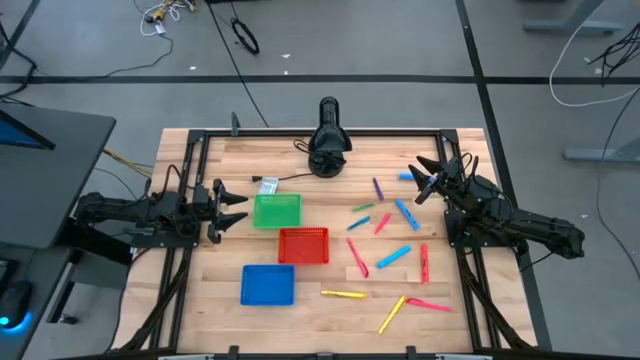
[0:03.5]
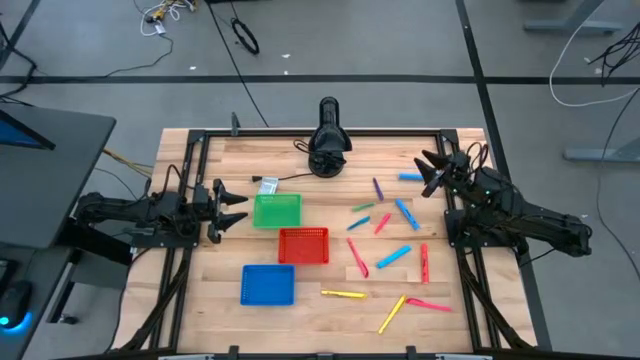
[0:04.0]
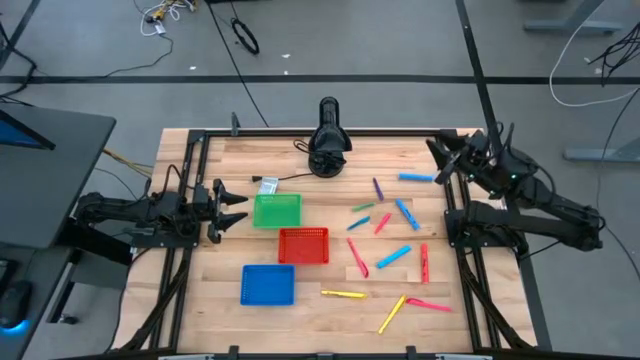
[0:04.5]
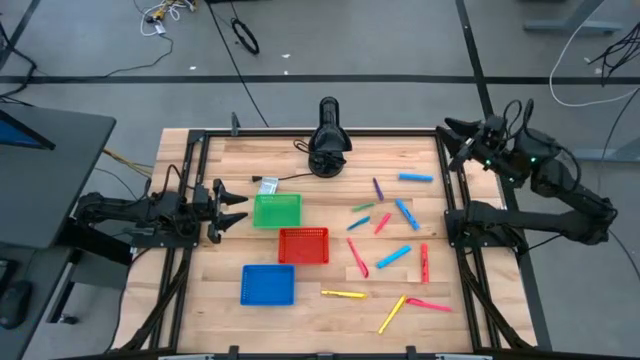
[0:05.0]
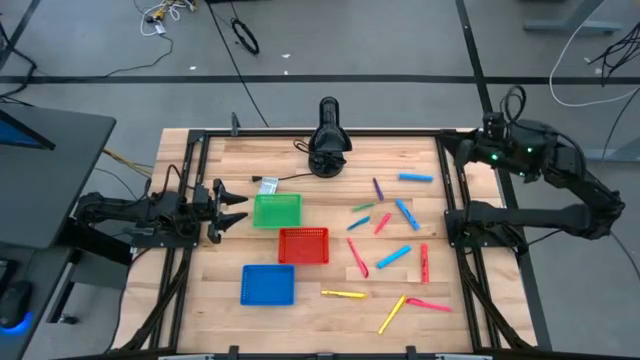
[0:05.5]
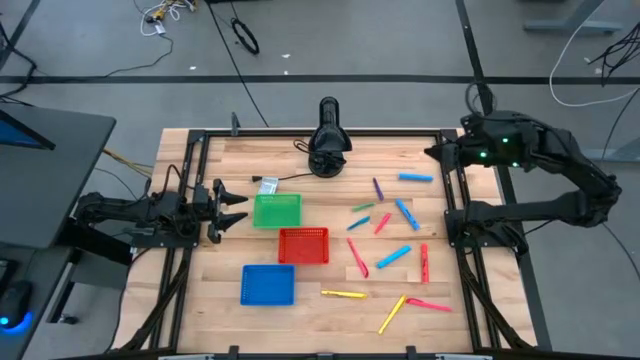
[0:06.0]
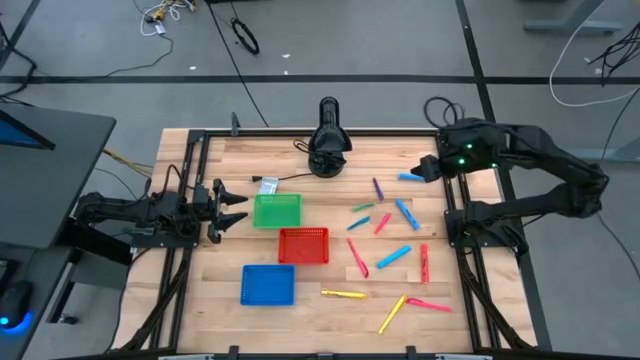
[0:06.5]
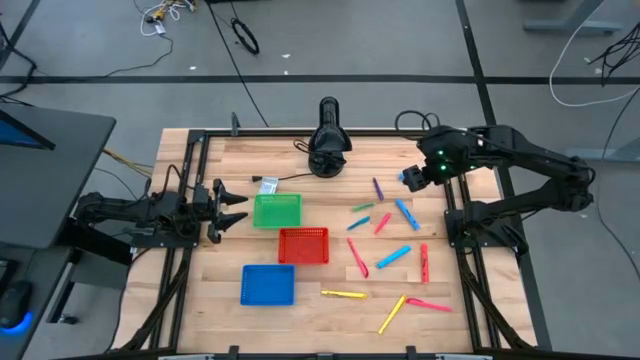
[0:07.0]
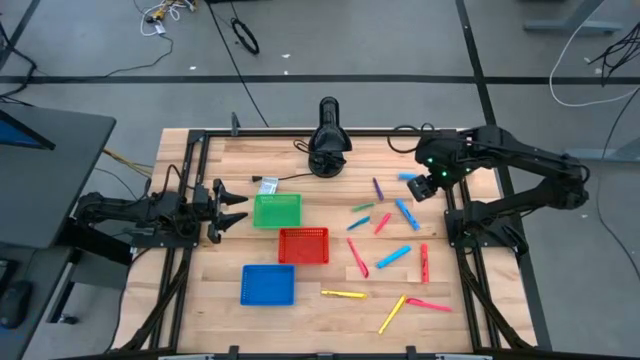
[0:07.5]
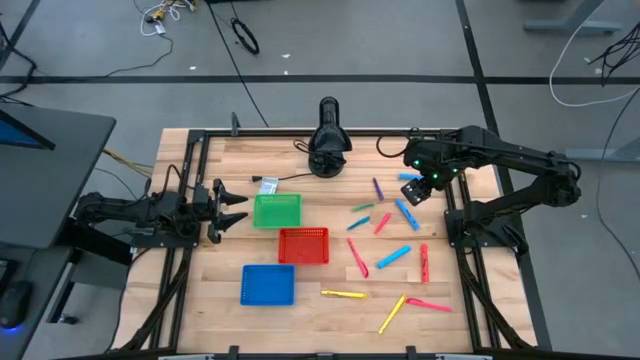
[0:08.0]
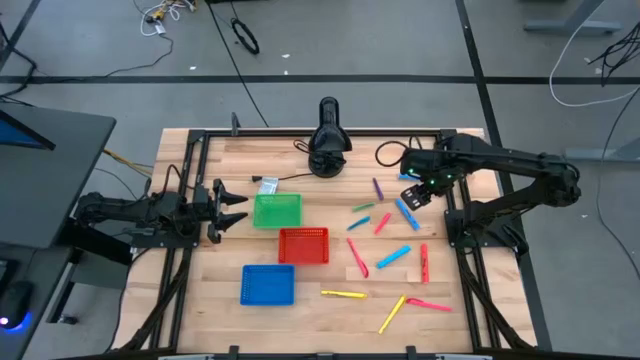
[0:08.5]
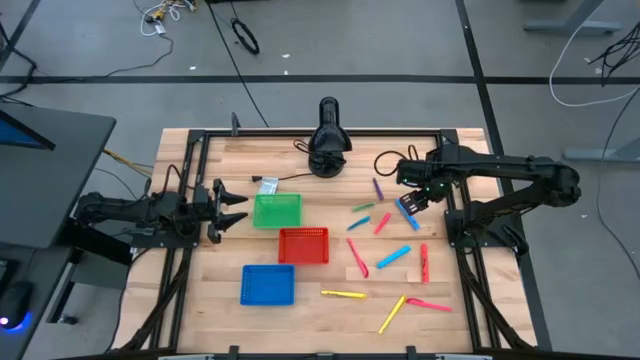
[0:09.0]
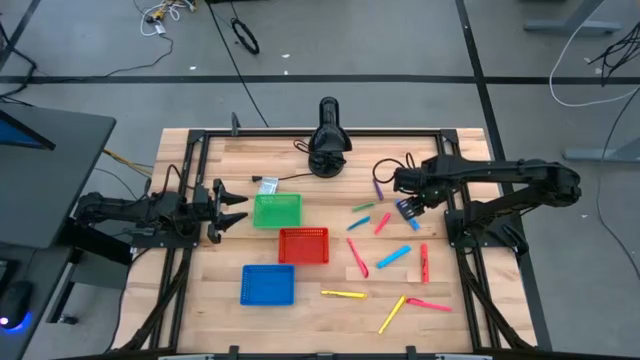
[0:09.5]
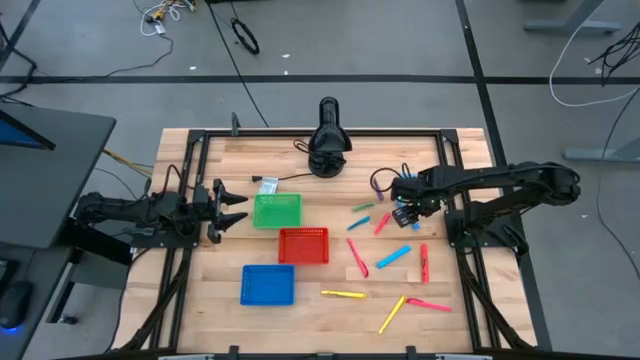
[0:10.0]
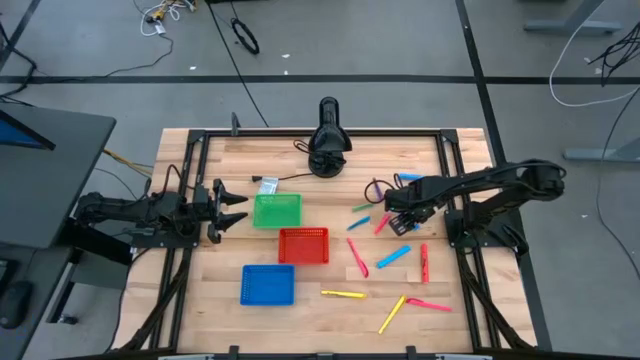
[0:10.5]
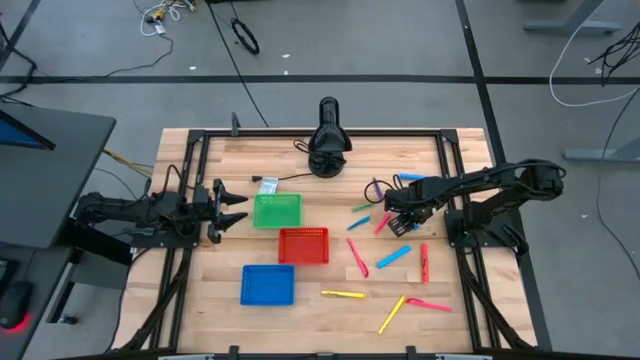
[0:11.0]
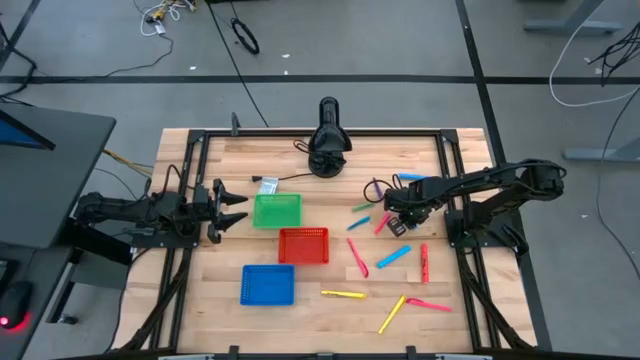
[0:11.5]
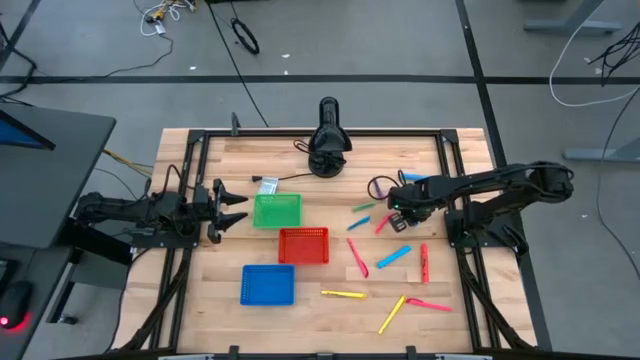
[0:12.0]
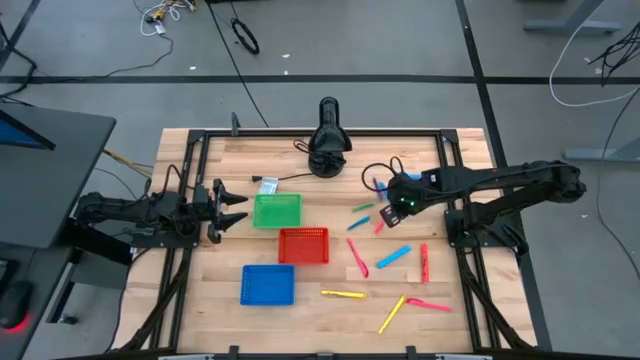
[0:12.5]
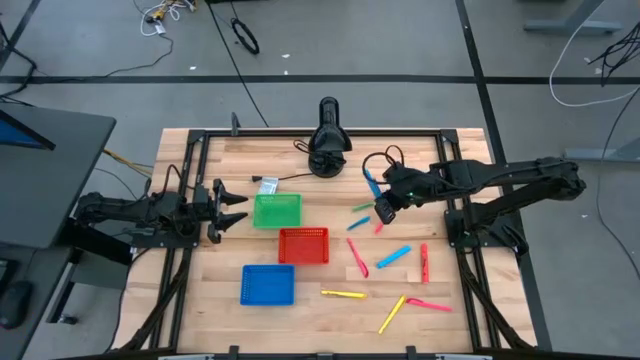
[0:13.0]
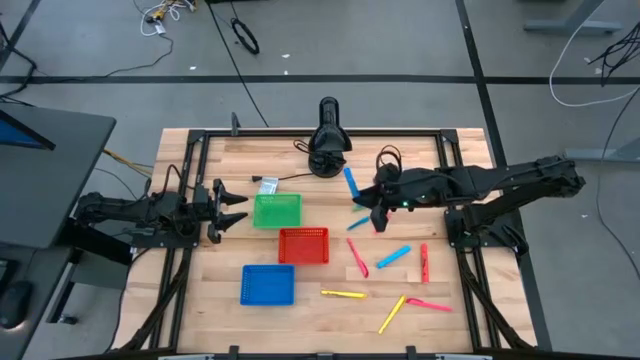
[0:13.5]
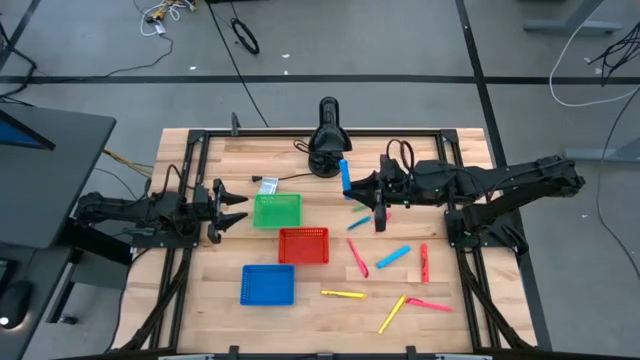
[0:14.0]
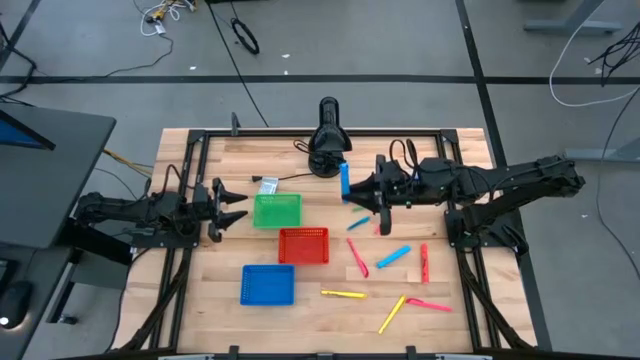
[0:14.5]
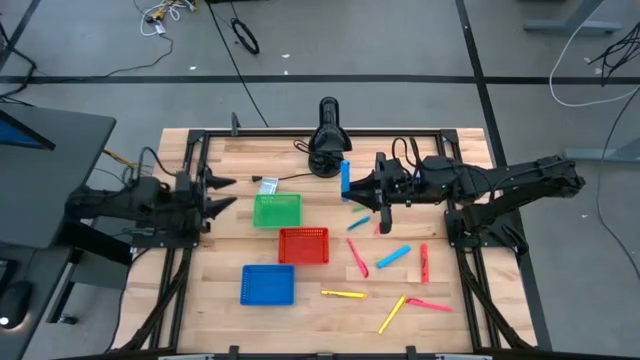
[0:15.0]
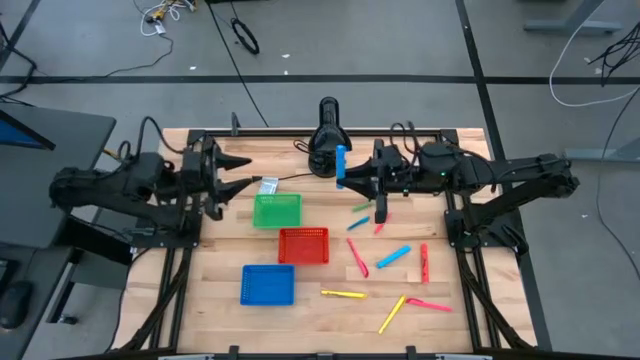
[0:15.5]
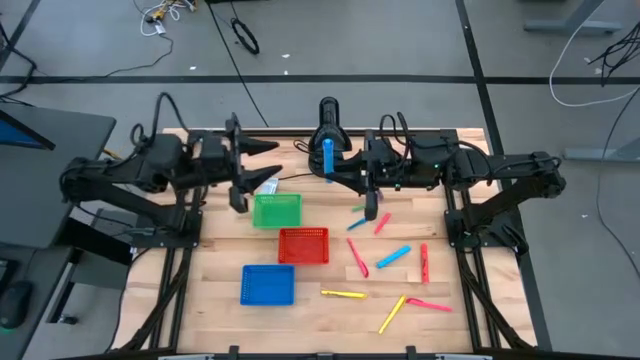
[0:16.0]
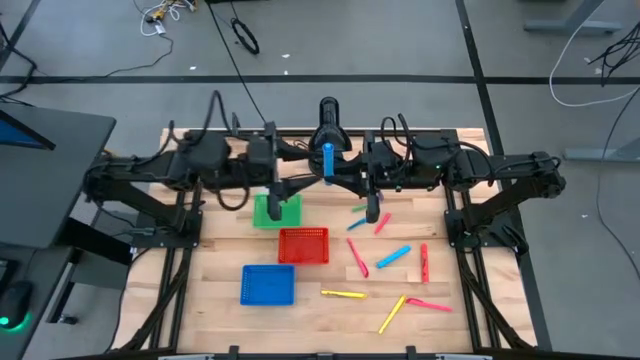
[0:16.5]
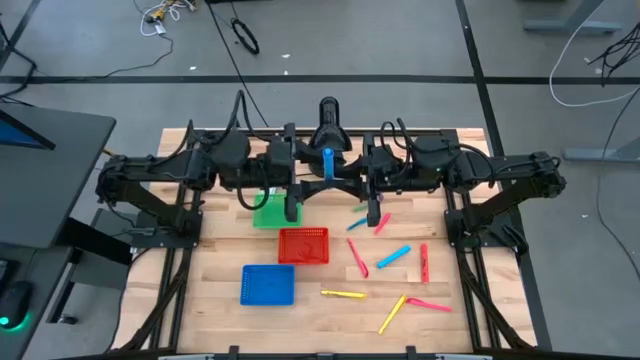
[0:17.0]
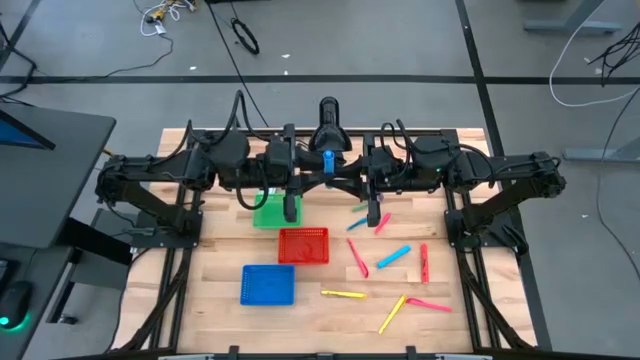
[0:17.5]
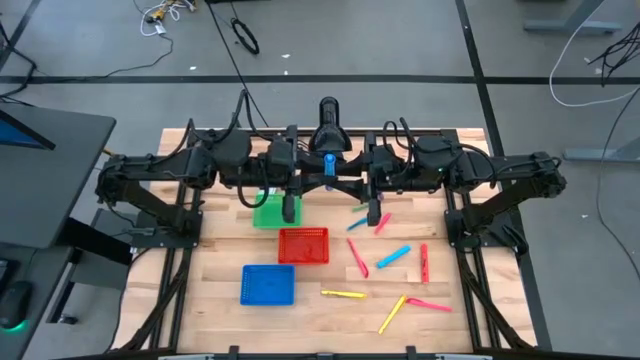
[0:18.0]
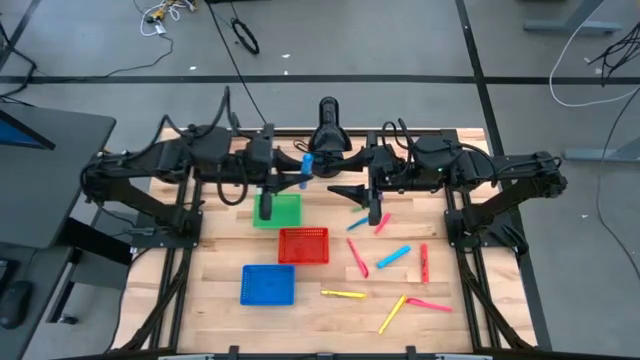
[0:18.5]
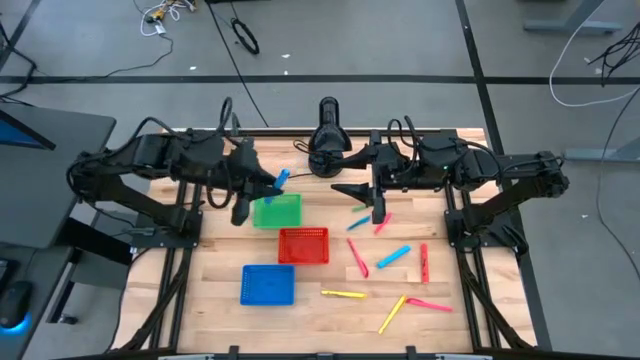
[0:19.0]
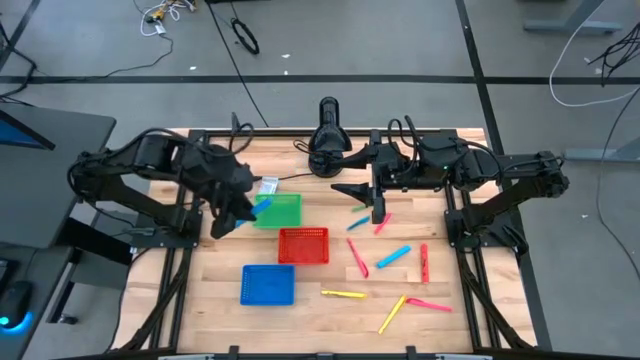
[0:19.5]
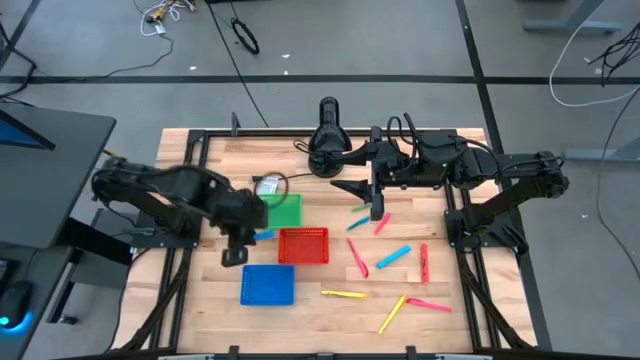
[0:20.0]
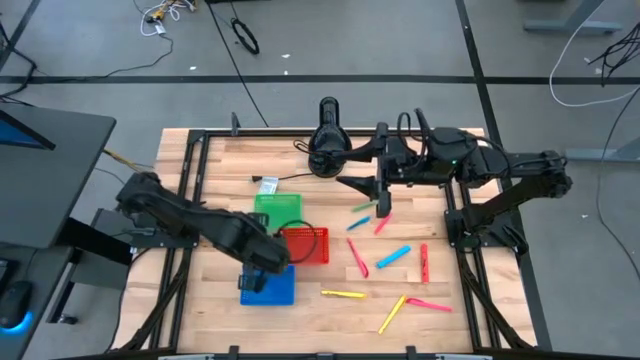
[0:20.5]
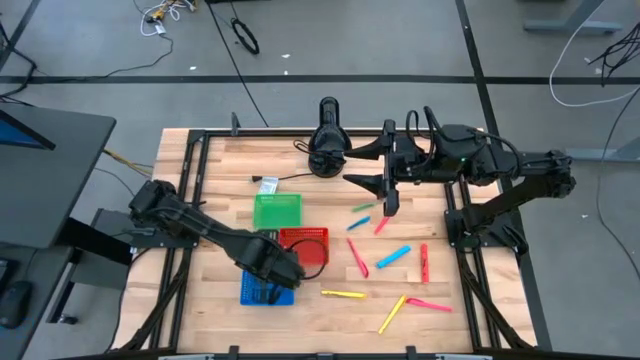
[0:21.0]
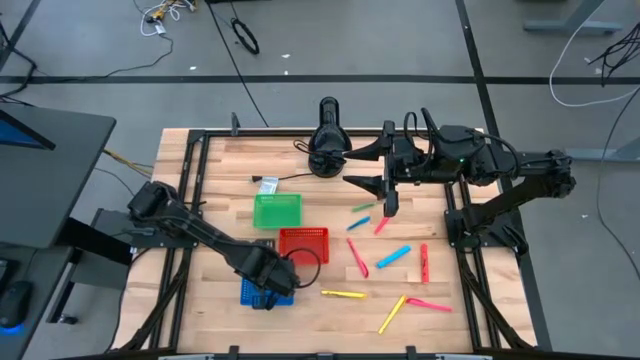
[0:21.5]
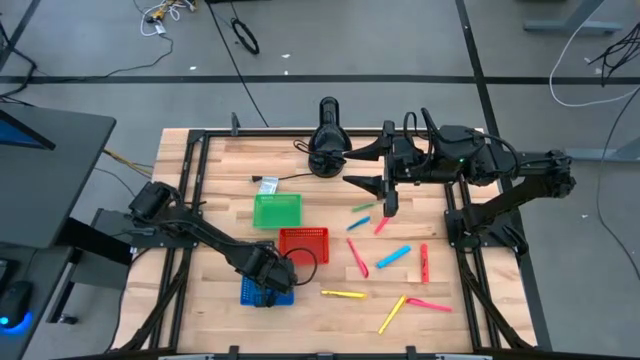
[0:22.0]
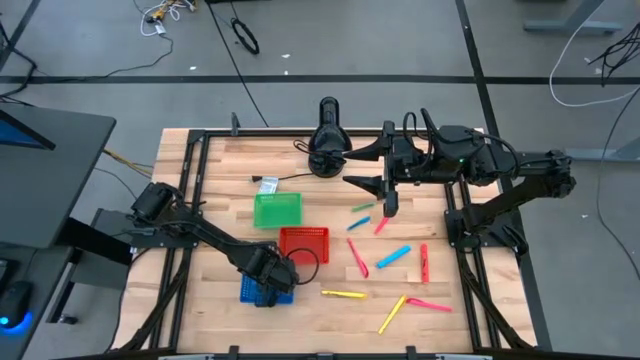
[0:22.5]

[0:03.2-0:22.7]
Task: Pick & Place Markers
Put the middle blue highlighter pen into the blue bin
